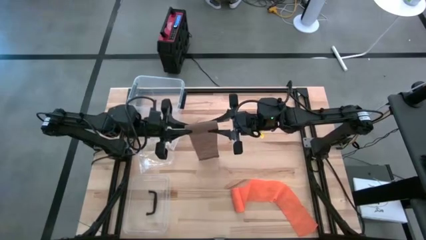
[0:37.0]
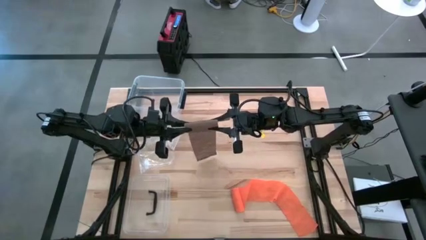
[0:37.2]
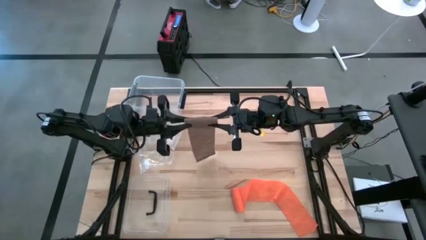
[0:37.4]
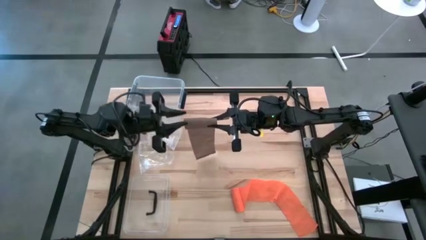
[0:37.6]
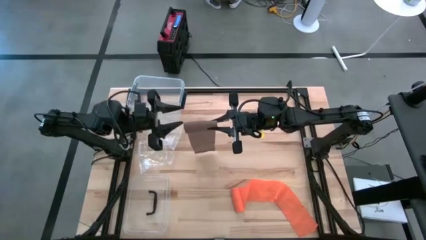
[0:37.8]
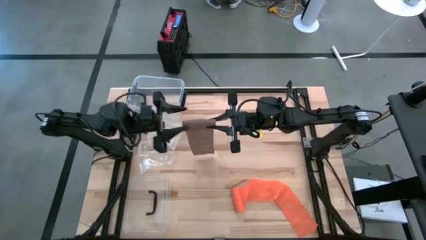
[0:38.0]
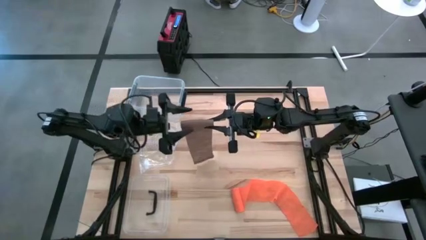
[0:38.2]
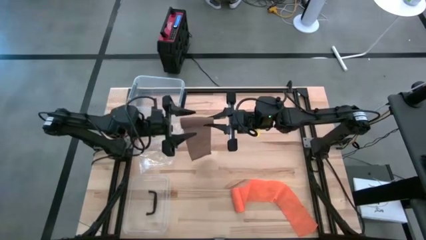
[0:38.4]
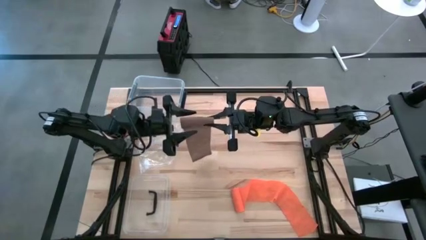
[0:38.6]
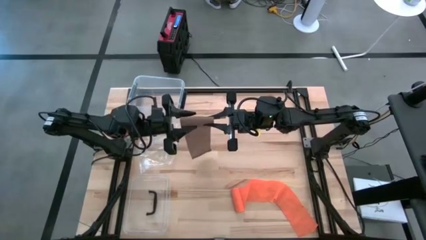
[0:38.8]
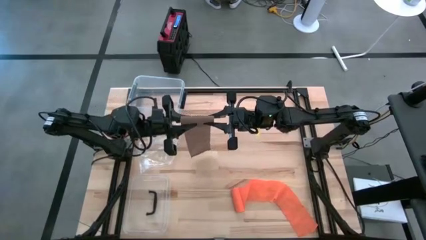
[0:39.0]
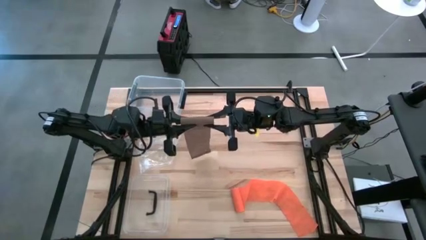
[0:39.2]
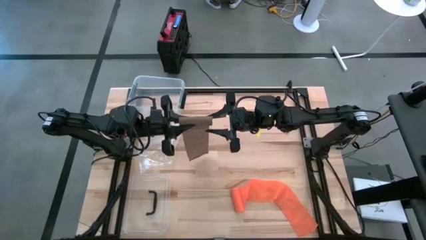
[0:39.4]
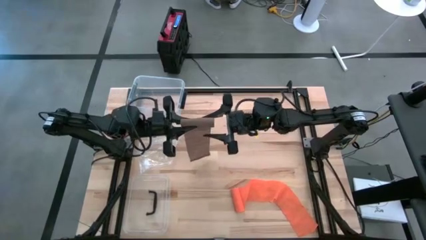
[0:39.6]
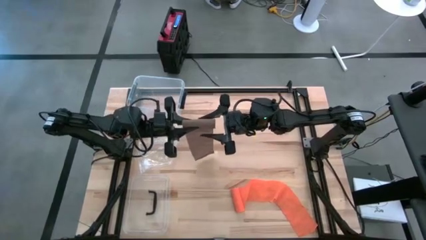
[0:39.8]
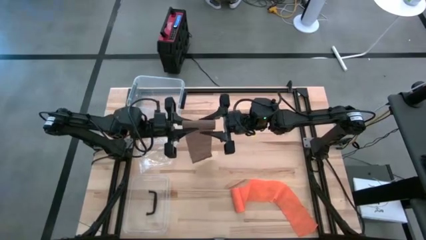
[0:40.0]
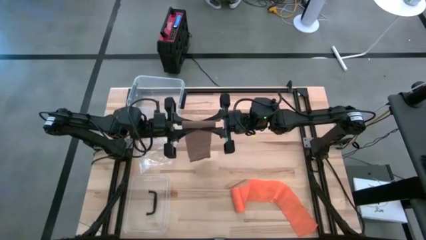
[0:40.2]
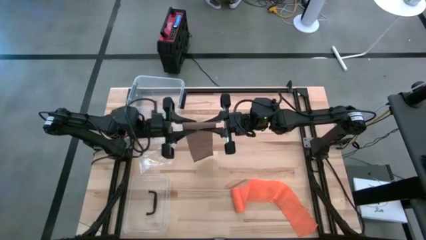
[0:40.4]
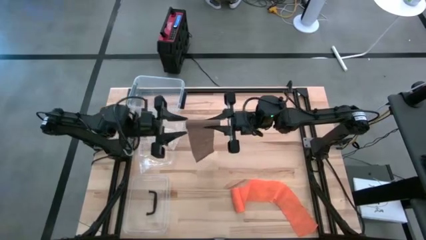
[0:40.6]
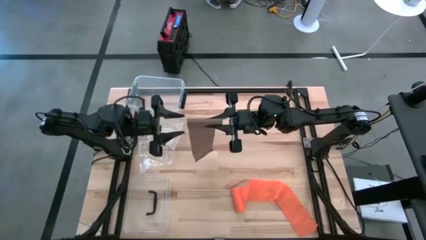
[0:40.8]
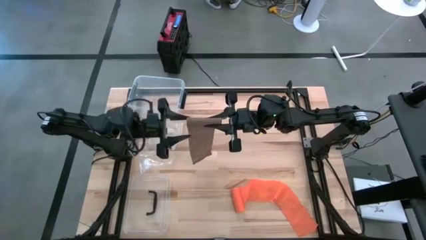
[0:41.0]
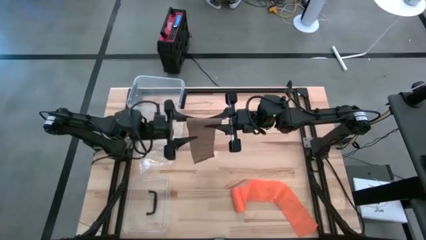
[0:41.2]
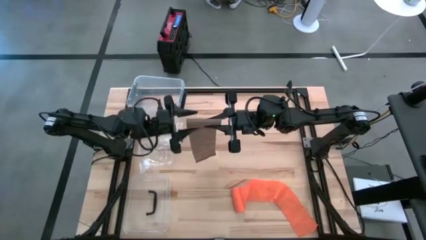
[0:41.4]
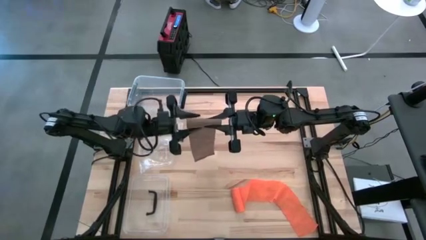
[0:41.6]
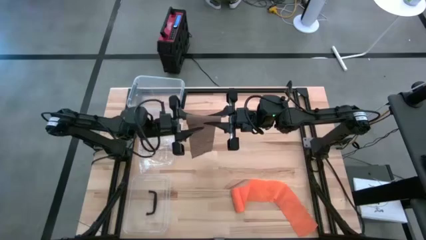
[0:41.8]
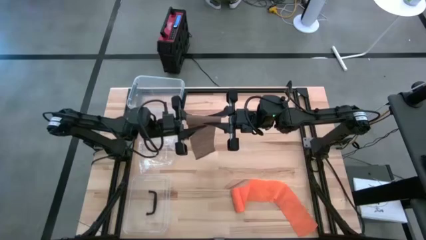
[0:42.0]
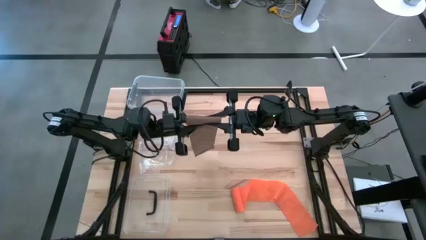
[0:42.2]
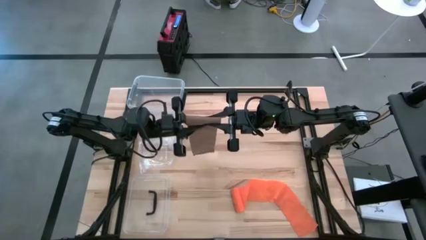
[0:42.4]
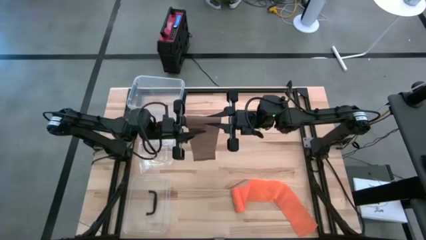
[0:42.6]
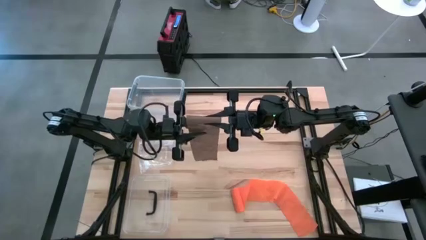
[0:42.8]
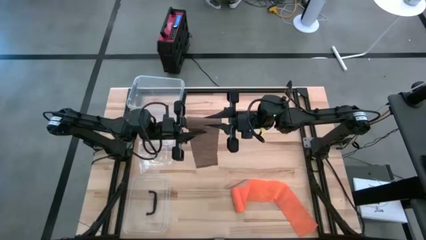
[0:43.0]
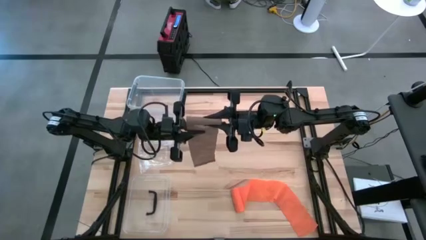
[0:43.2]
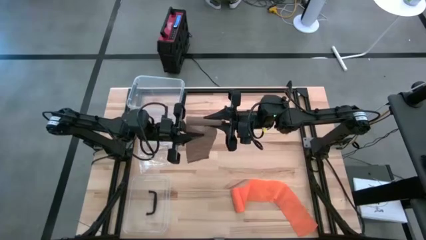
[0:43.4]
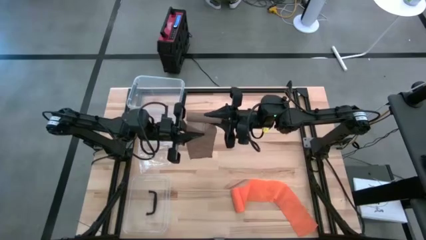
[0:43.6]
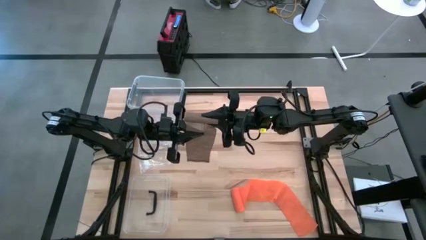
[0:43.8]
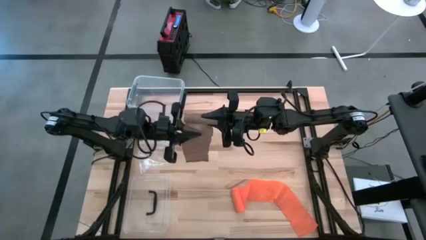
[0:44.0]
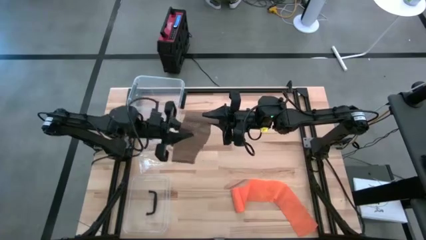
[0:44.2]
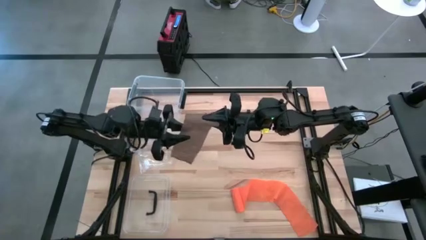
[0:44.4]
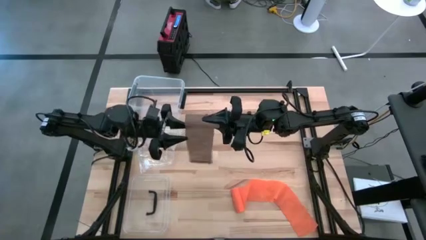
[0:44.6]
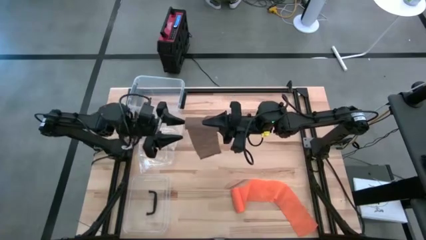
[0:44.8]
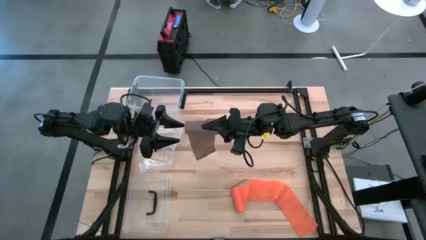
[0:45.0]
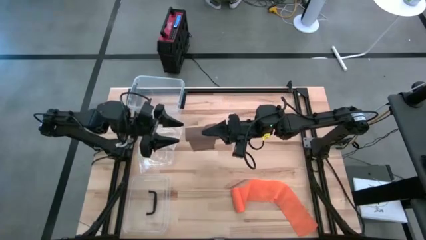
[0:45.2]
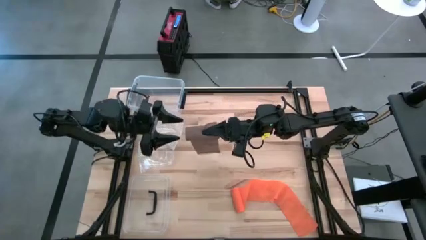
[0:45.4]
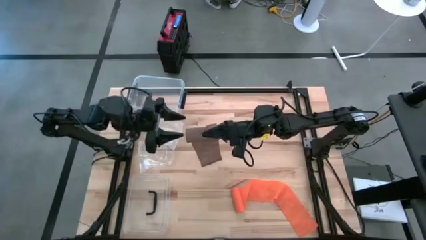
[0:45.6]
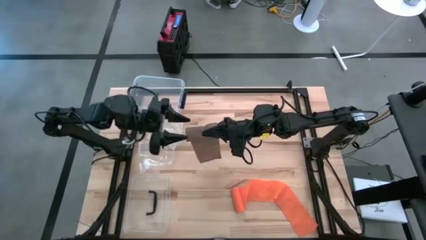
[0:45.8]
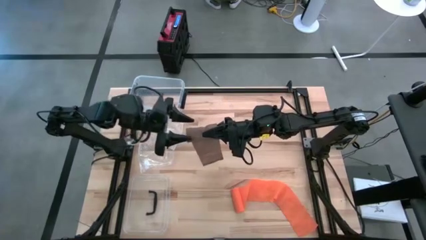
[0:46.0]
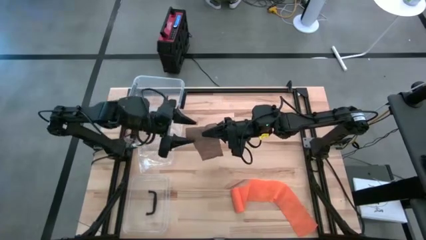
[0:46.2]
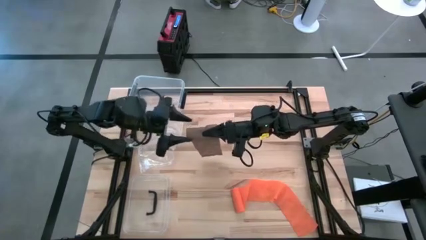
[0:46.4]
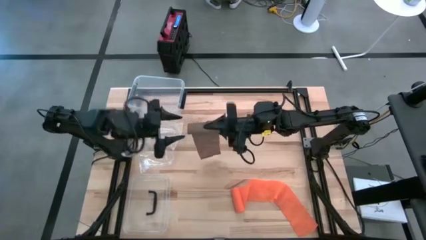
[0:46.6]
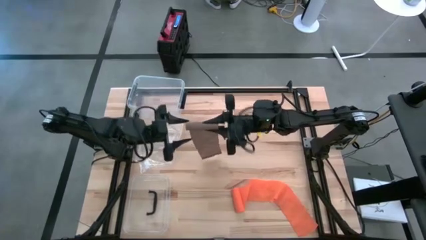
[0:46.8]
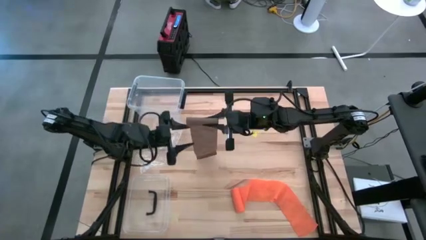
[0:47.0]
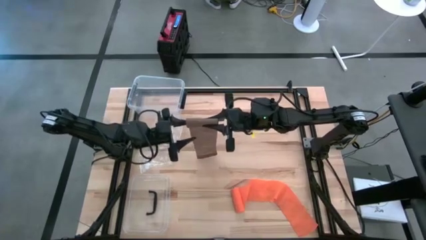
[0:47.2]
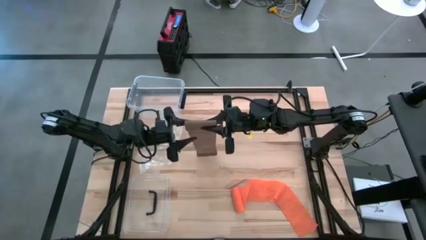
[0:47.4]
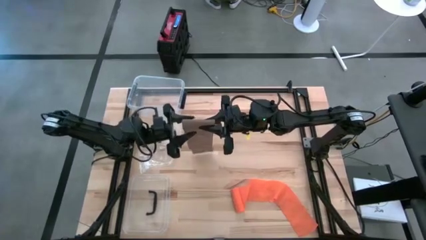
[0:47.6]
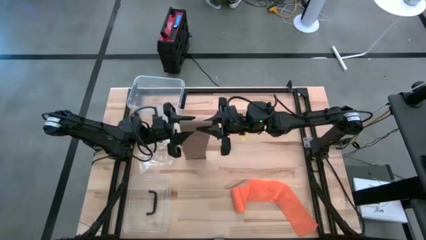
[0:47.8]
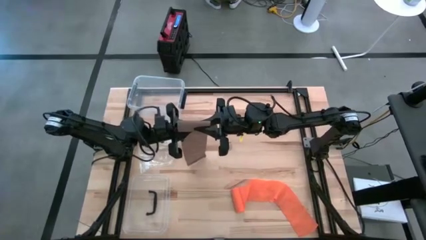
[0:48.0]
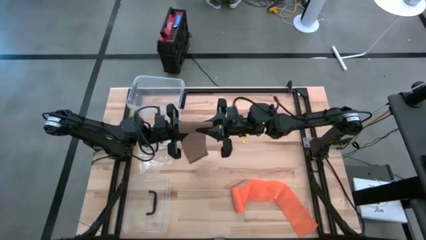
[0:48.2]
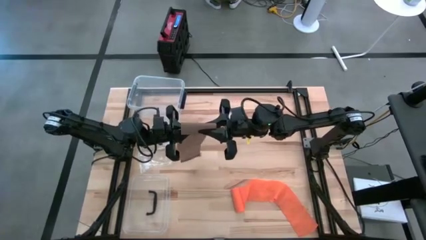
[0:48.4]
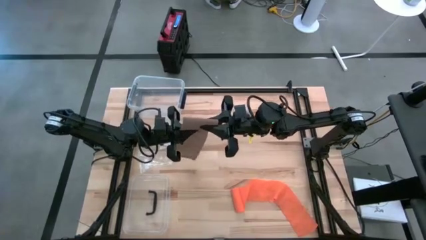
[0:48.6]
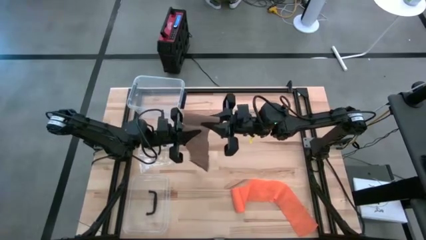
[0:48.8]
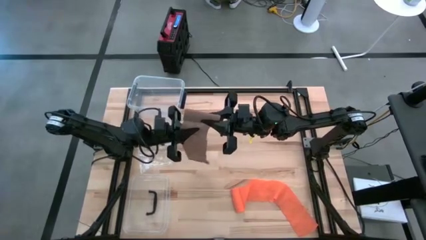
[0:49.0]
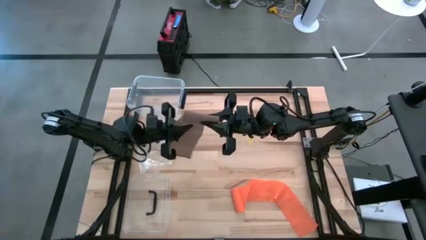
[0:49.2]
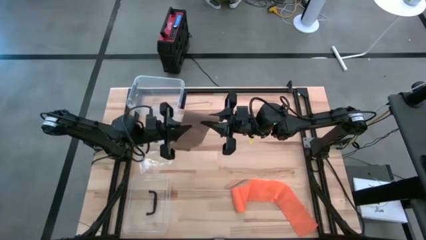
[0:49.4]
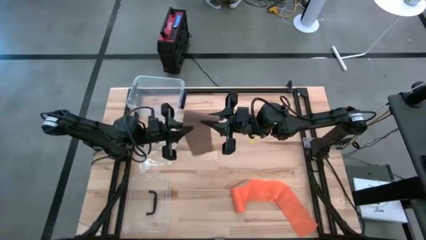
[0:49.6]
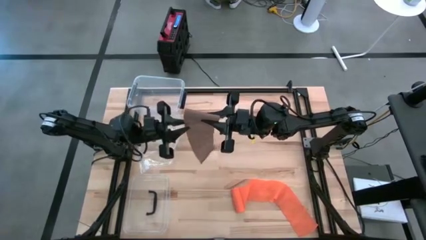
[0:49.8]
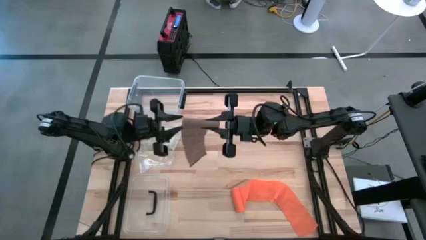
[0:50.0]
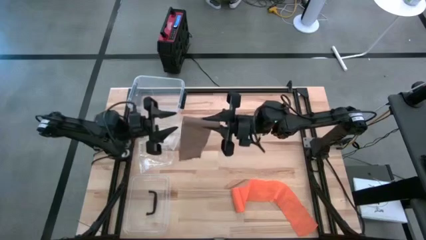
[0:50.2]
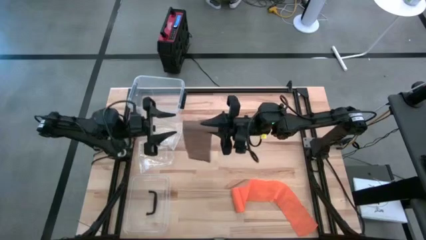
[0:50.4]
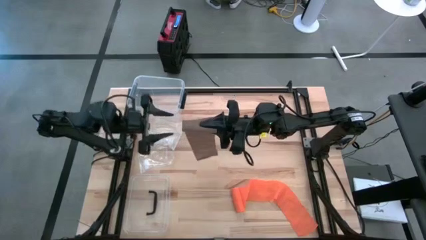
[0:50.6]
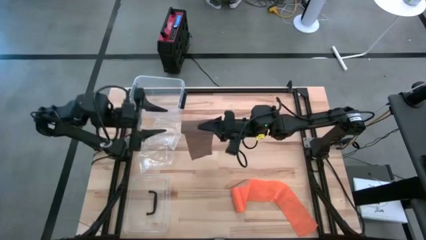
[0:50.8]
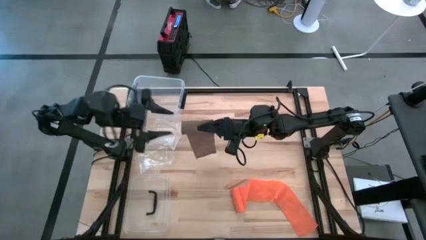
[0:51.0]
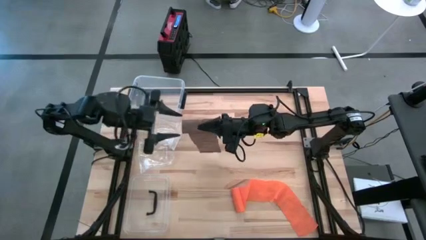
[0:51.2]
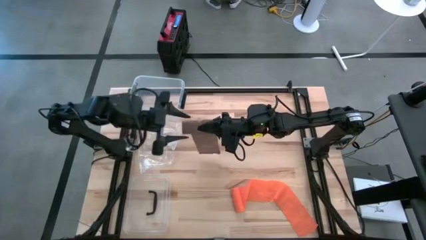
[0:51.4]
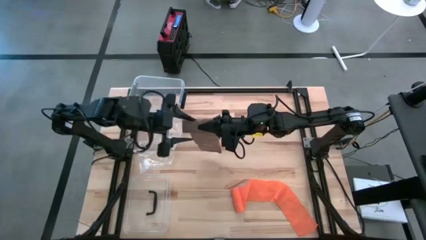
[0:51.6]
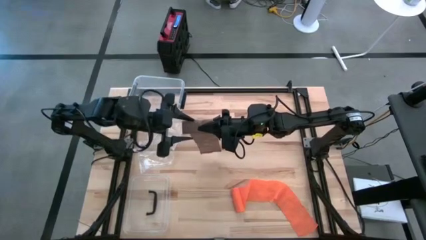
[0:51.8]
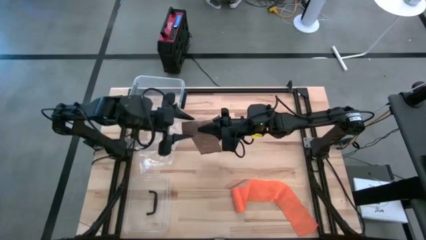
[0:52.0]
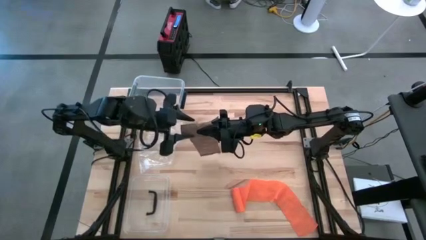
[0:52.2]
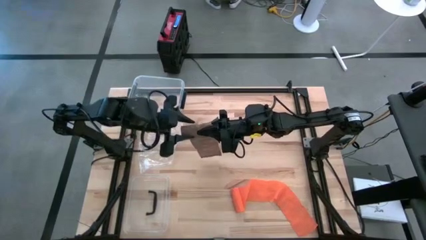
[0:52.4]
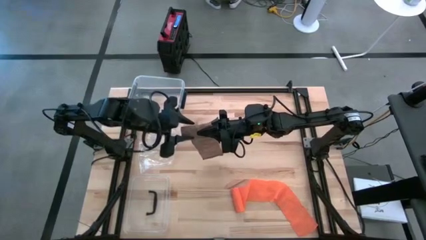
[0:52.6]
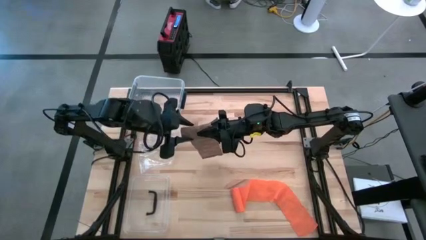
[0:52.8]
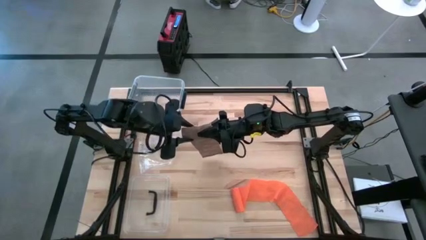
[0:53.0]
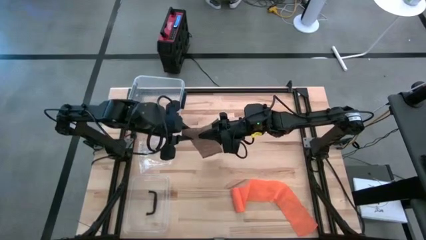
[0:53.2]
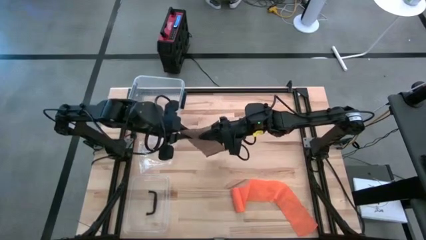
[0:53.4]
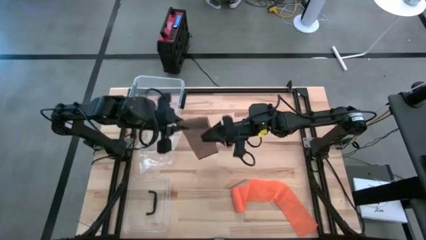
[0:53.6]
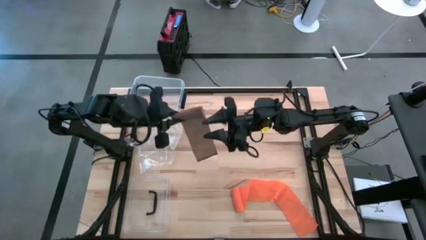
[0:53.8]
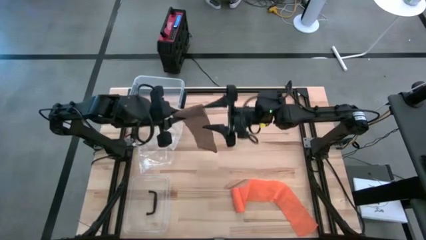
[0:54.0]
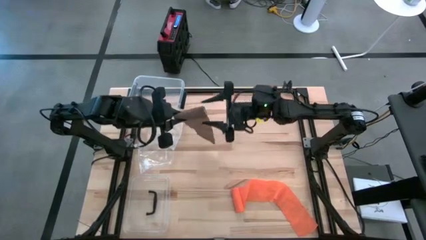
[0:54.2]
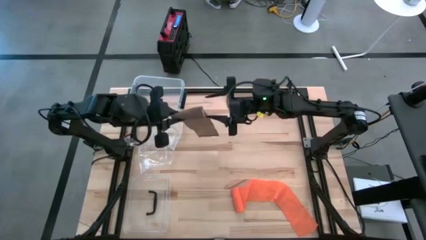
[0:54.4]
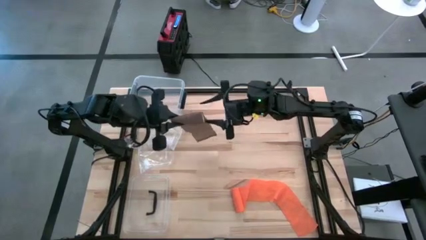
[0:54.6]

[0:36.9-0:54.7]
Task: Roll bandage
Roll the brown bandage
